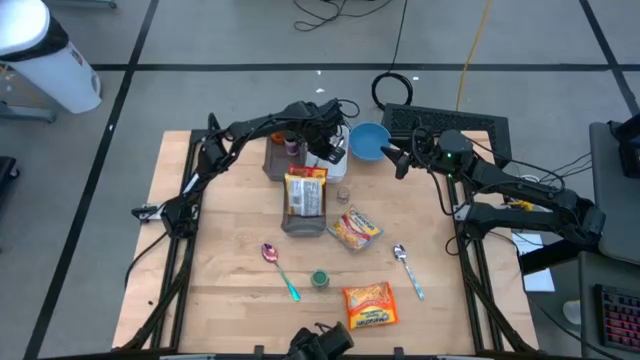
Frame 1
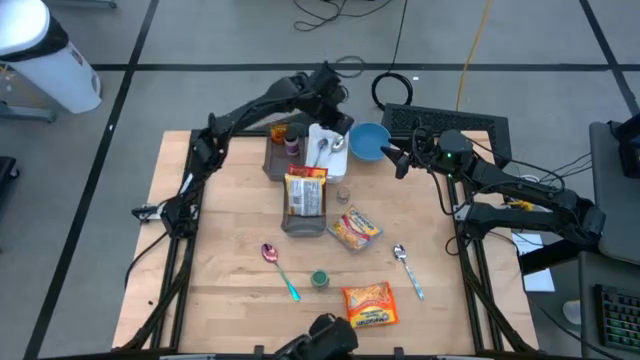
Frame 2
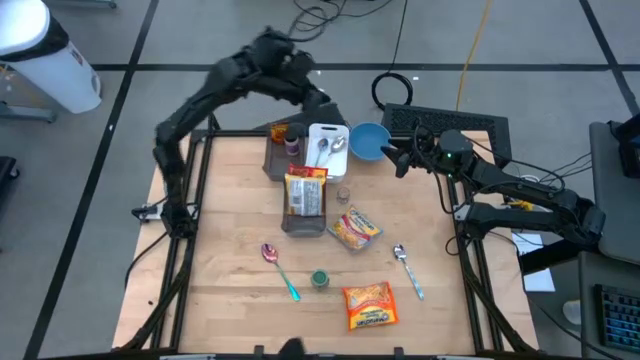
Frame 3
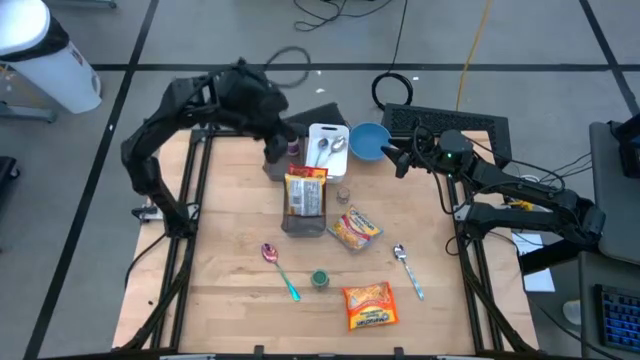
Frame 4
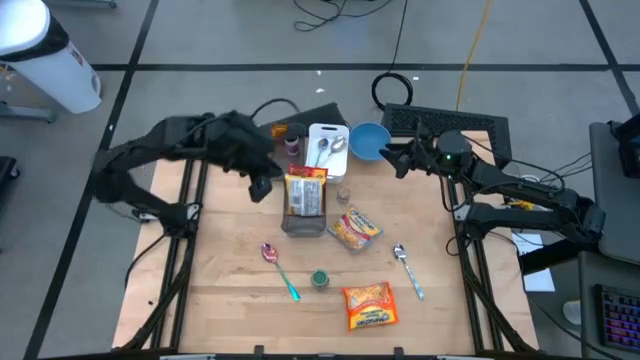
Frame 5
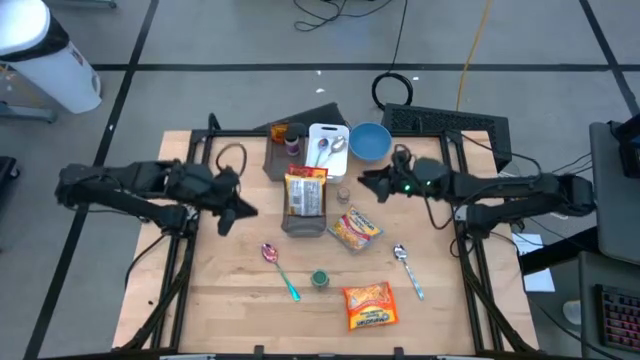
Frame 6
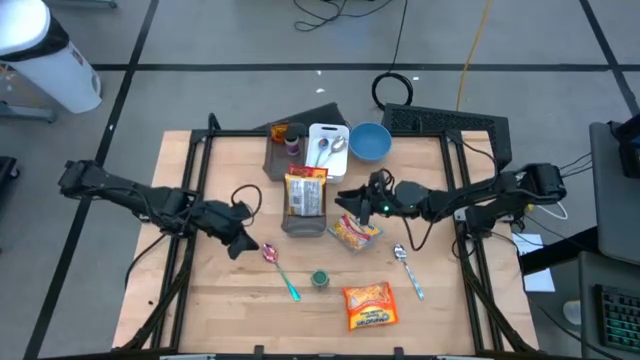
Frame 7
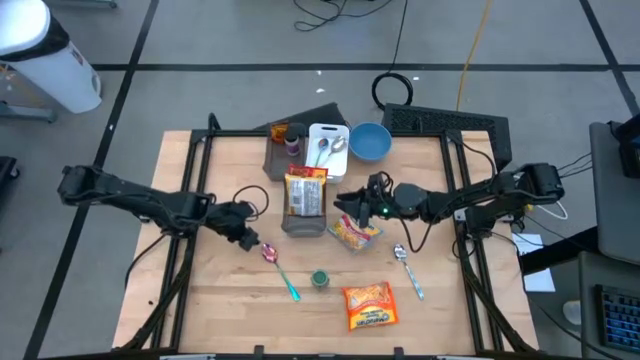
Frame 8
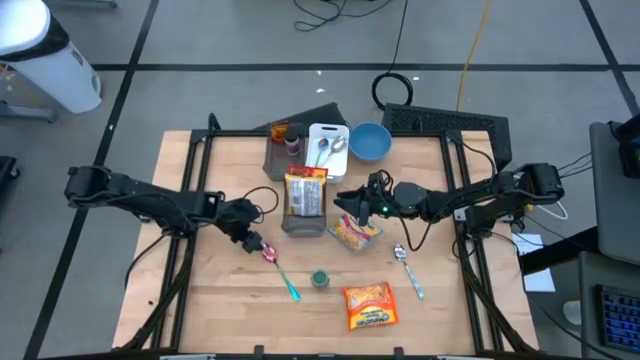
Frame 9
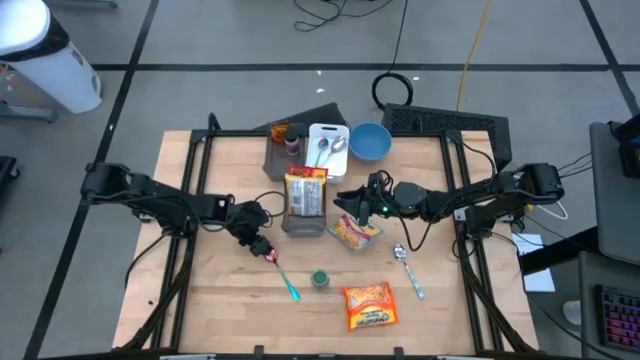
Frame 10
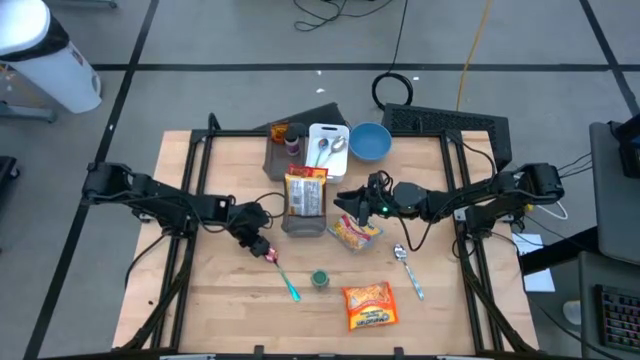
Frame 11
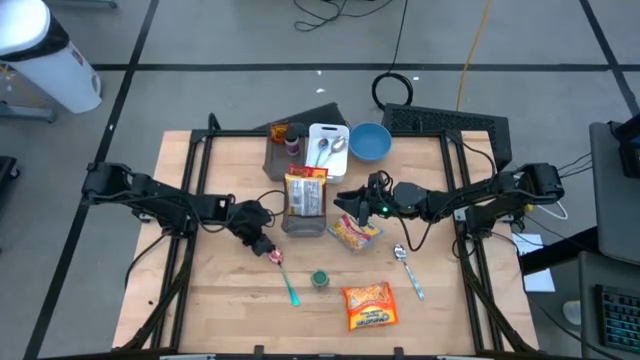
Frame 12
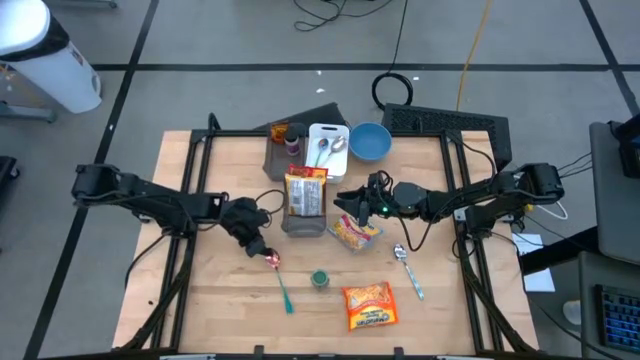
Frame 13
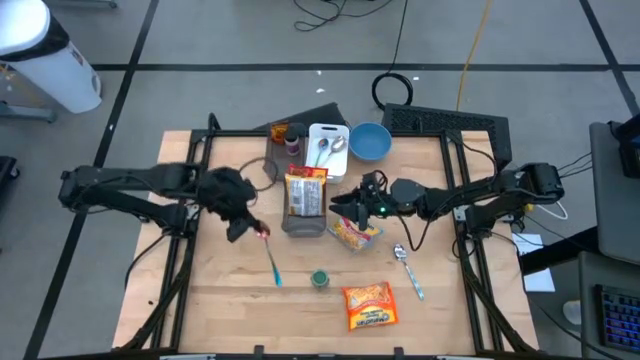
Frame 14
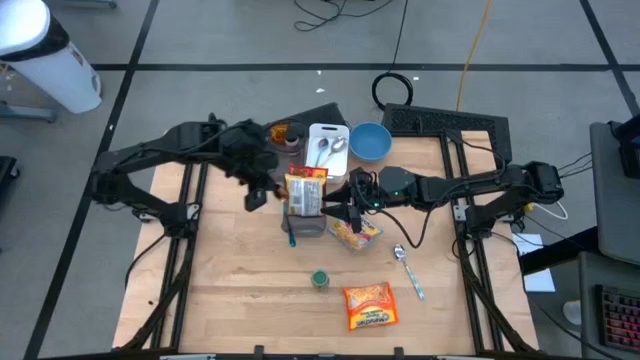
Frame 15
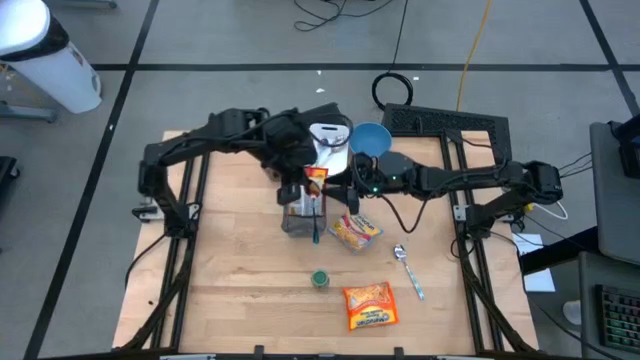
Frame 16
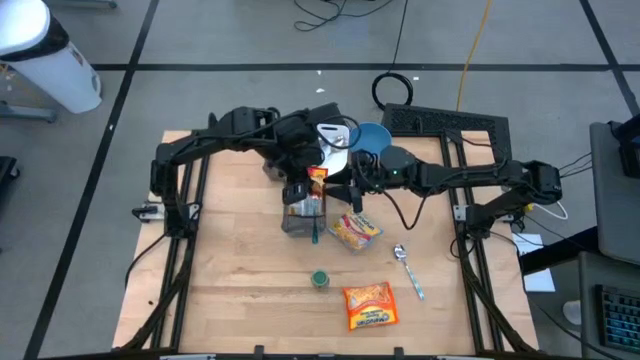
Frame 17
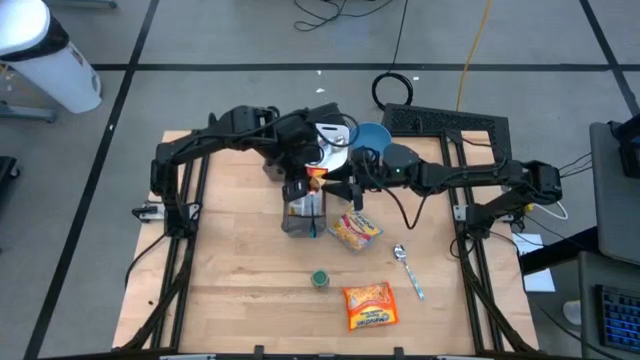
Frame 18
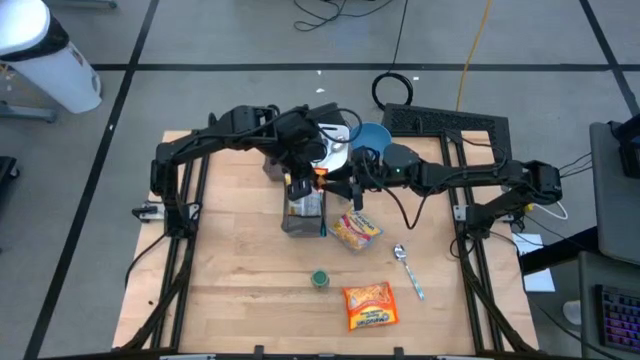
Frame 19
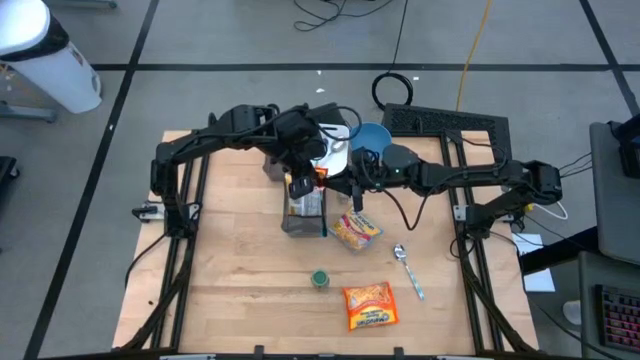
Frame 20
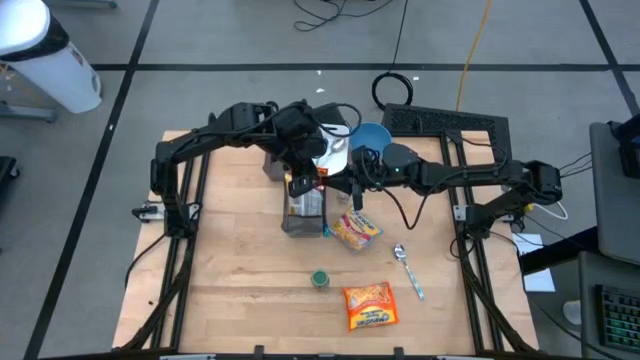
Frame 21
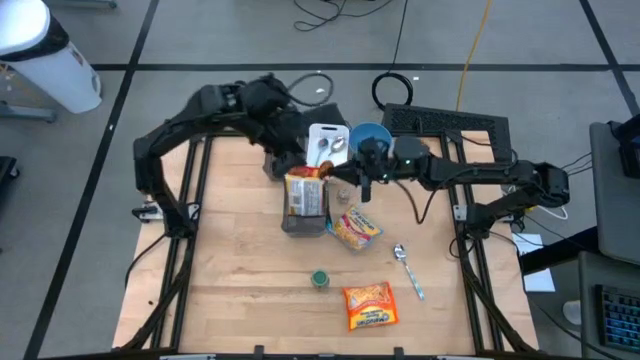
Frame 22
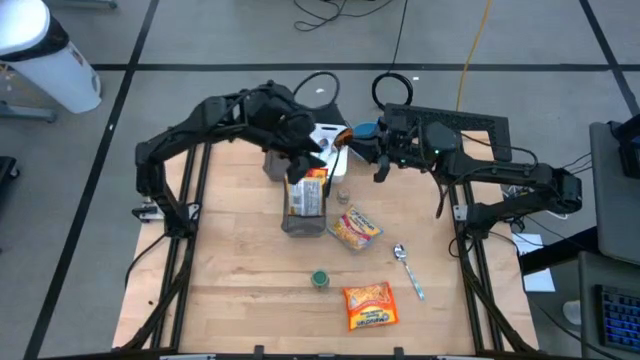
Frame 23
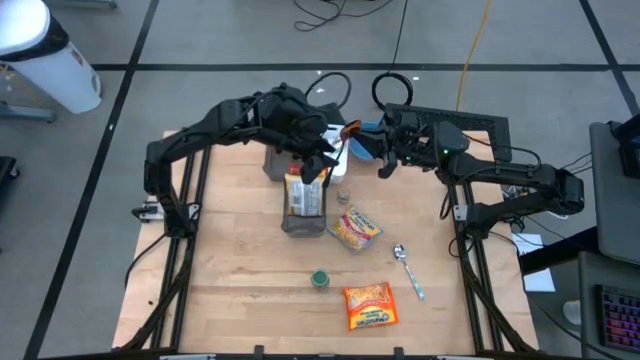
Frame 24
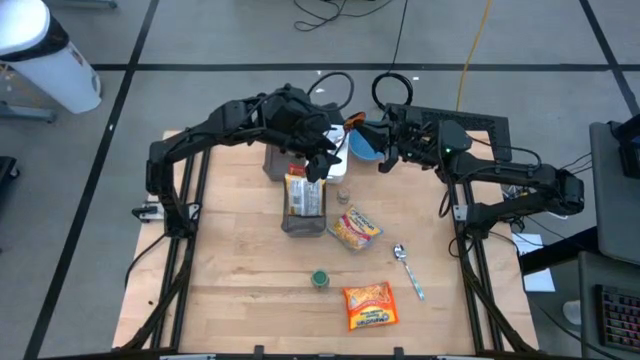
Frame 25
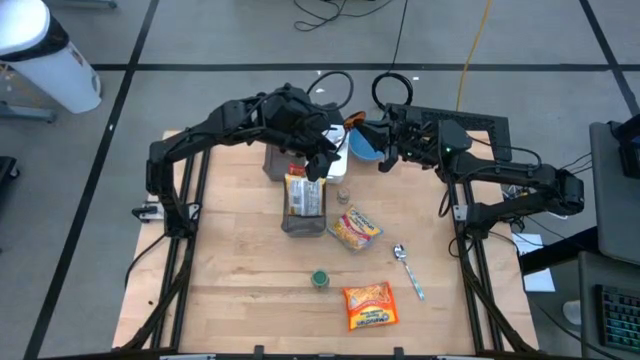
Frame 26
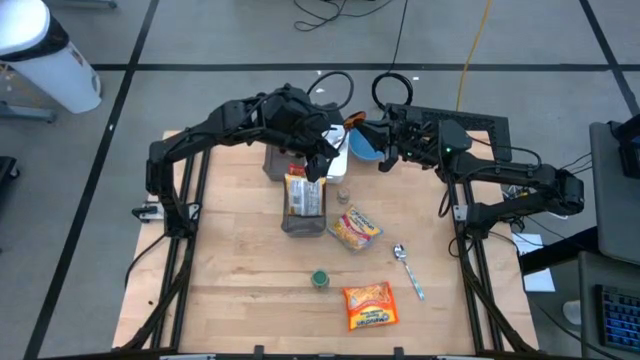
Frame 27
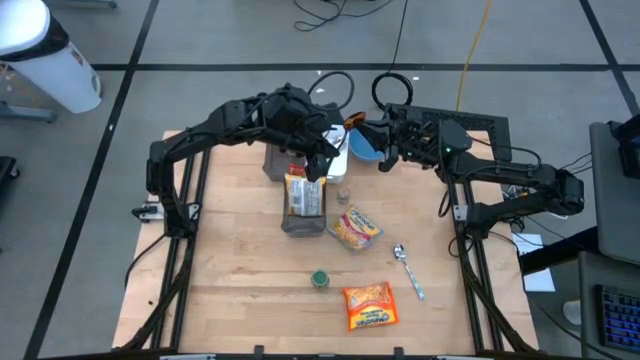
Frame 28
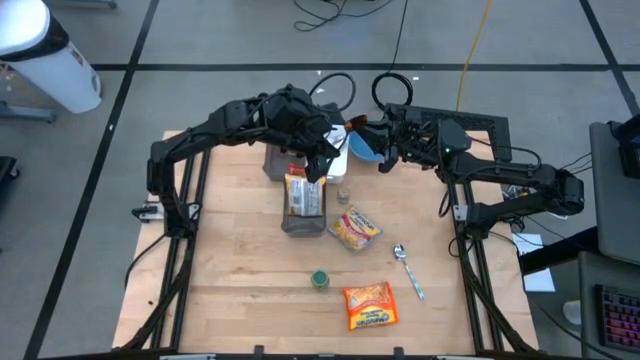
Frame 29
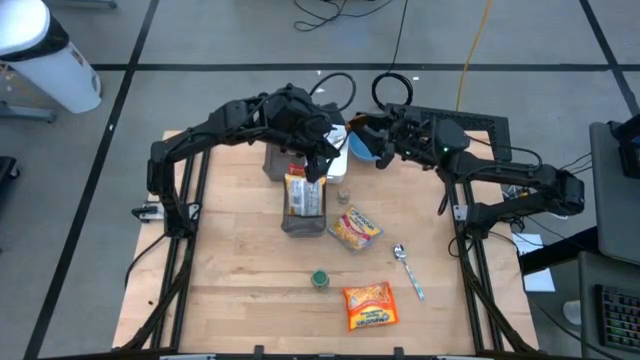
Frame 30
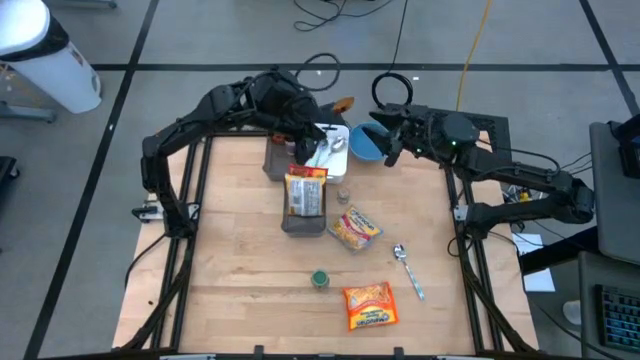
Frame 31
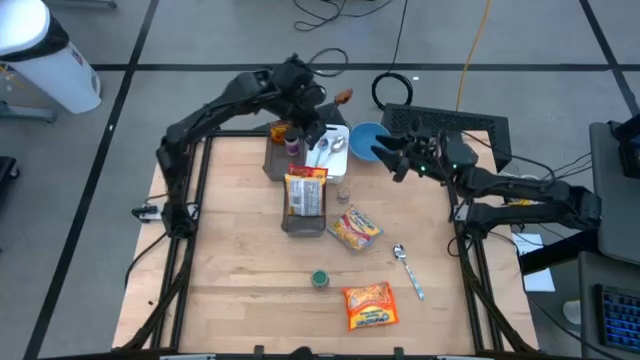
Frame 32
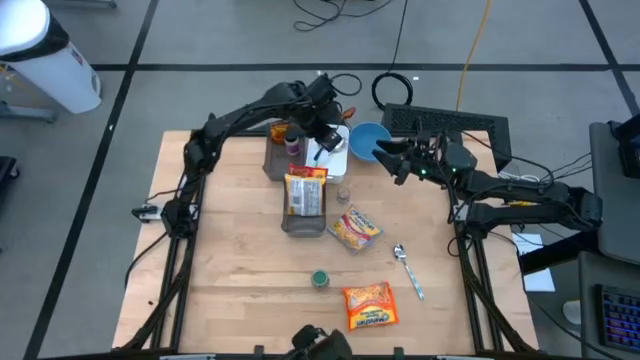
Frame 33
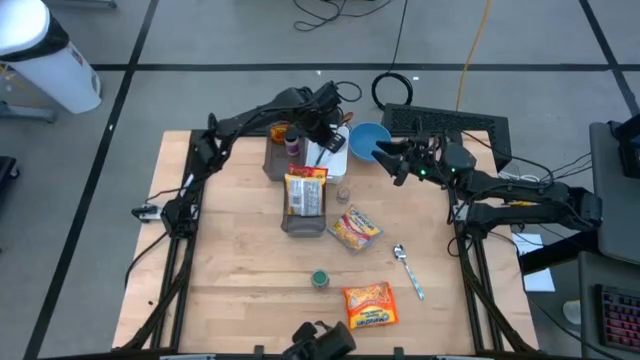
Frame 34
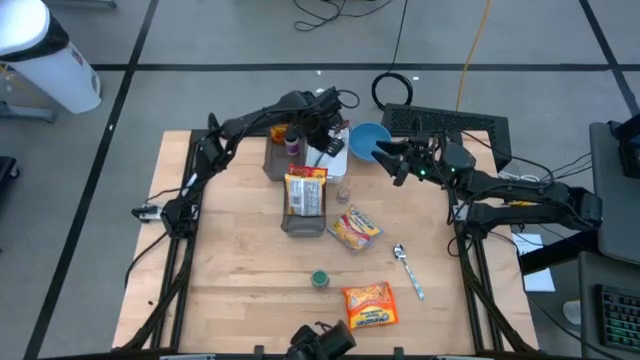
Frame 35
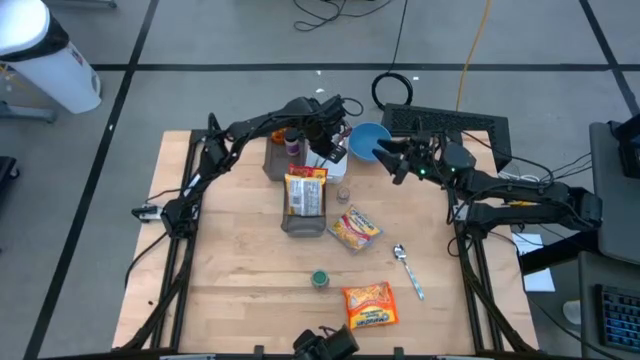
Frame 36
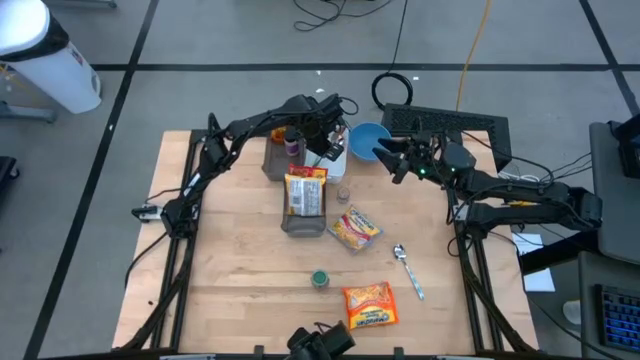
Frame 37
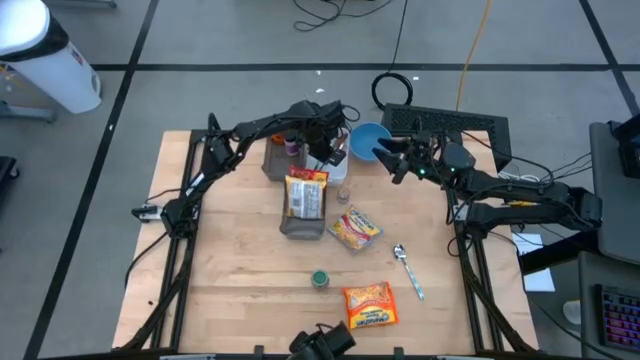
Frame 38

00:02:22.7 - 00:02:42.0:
Task: Pick & Place Food Item
Put the blue spoon into the white bin

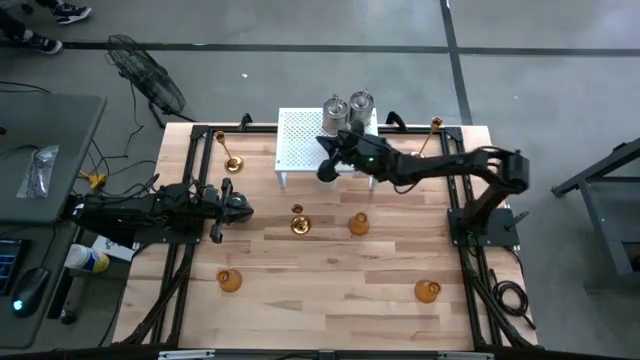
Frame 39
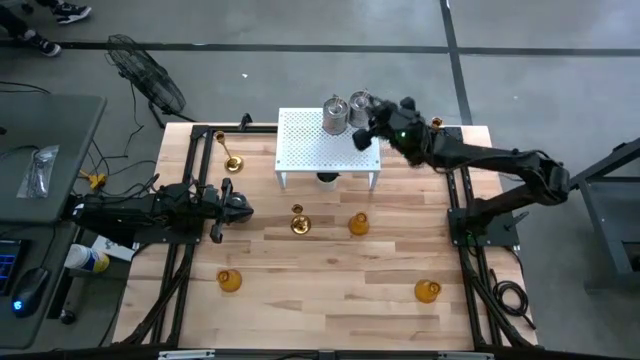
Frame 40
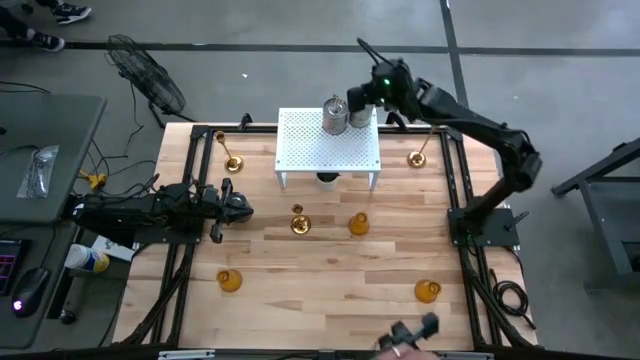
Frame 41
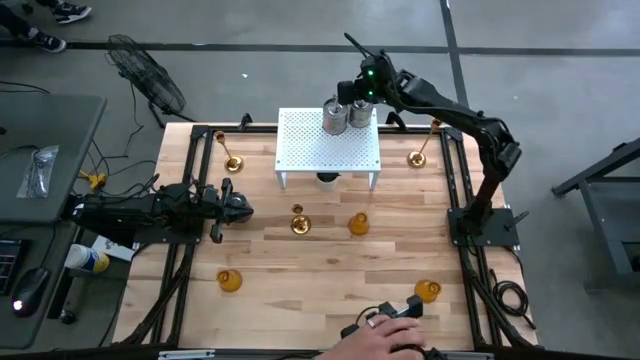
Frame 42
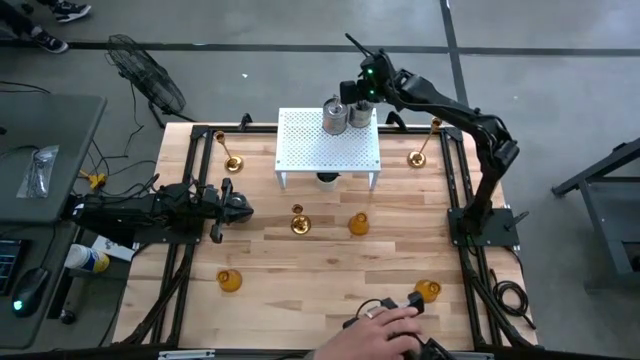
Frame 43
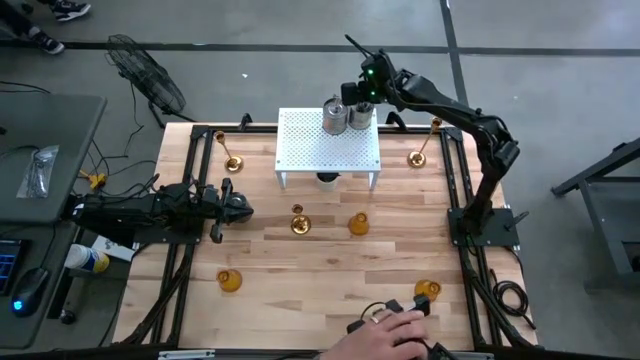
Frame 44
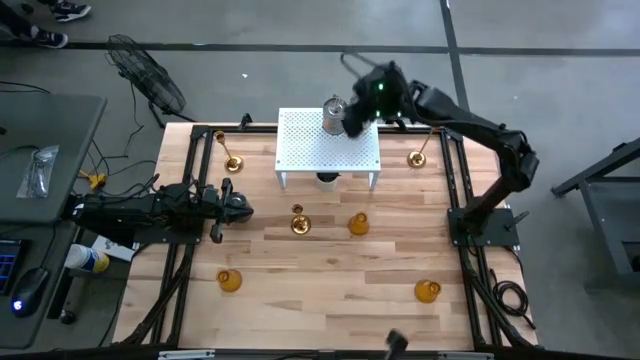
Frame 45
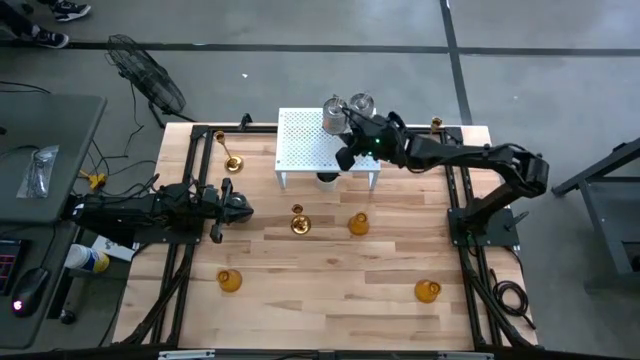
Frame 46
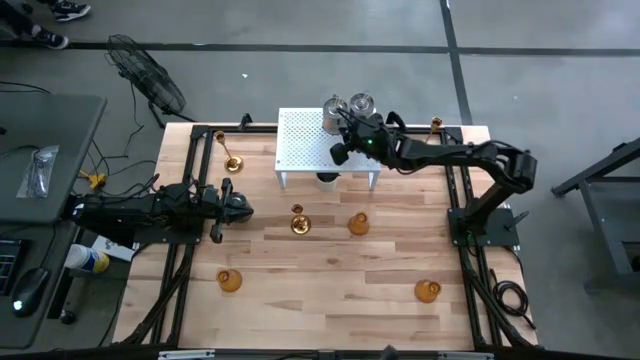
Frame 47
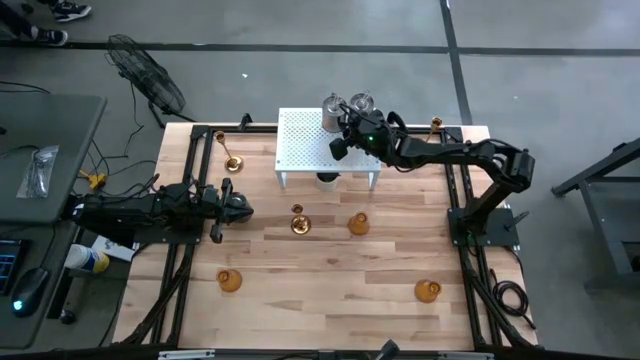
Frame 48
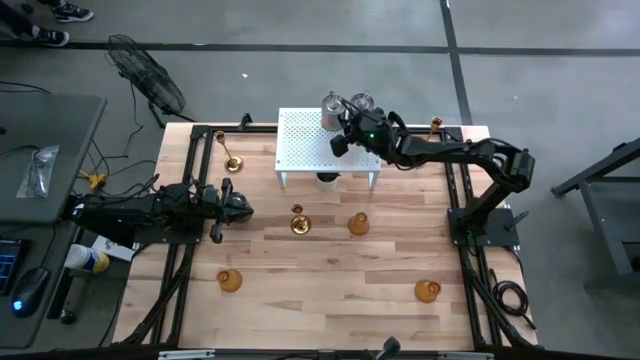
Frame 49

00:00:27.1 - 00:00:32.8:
Task: Pick & Place candle stick holders
Adjust the orange scented candle on the shelf
